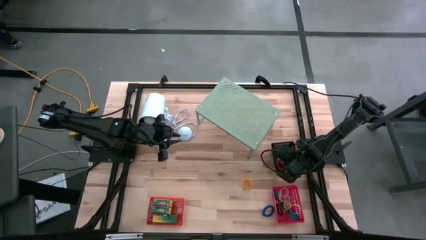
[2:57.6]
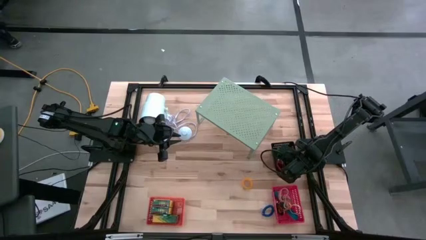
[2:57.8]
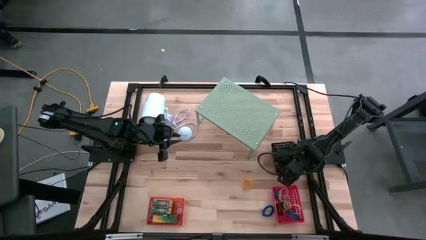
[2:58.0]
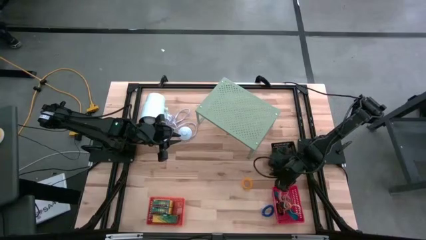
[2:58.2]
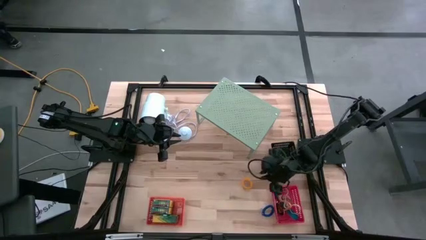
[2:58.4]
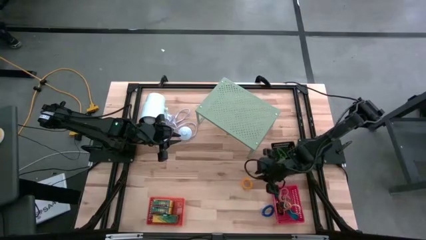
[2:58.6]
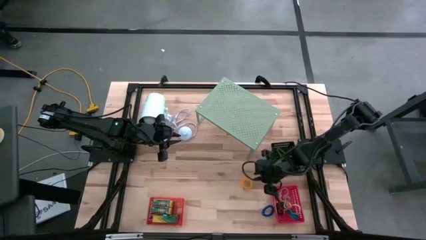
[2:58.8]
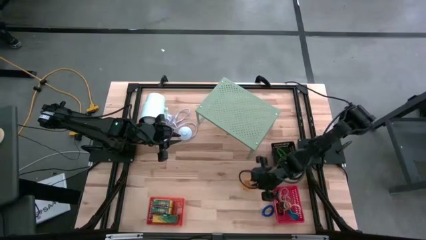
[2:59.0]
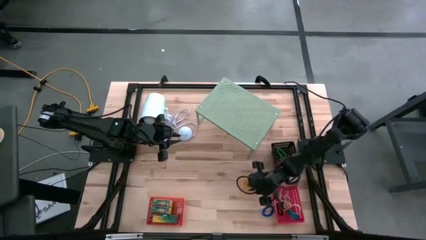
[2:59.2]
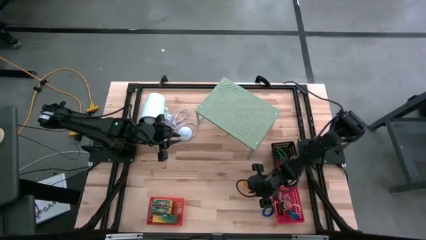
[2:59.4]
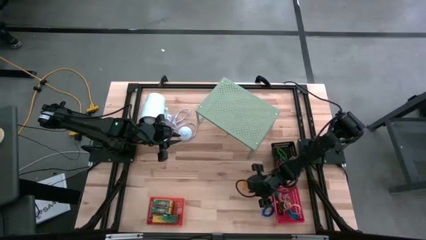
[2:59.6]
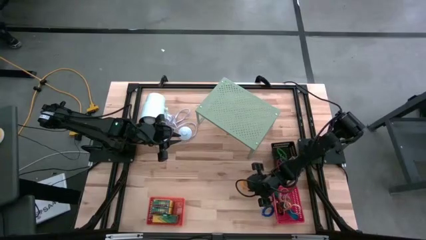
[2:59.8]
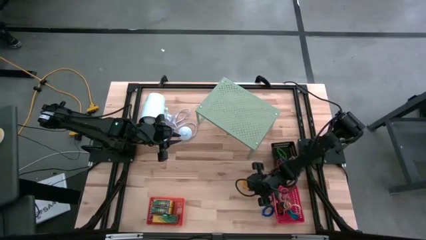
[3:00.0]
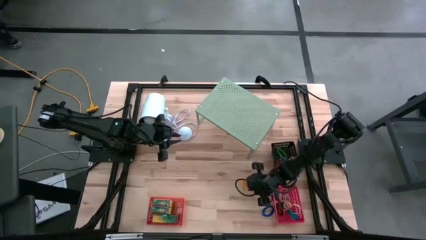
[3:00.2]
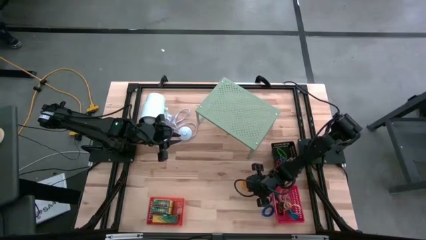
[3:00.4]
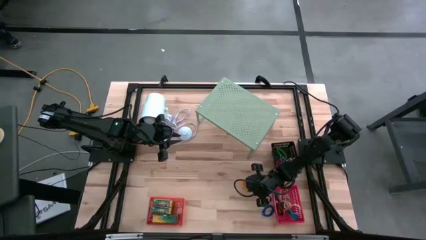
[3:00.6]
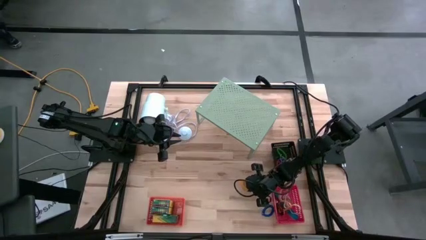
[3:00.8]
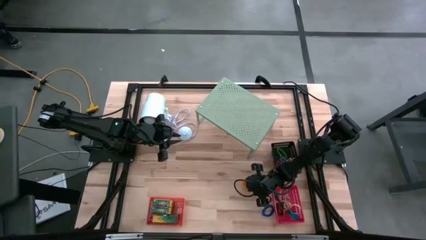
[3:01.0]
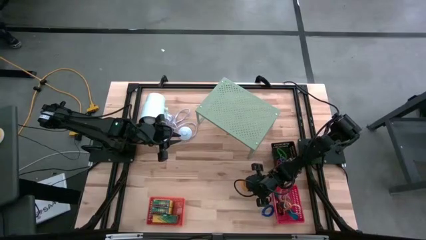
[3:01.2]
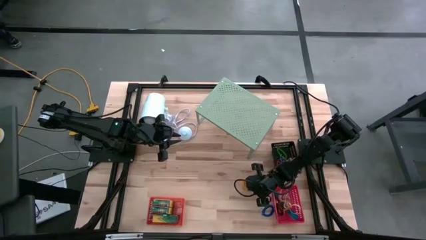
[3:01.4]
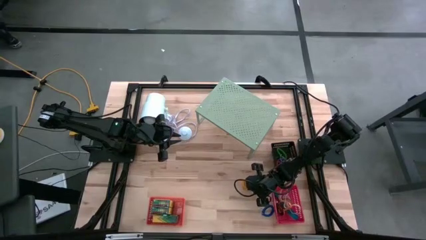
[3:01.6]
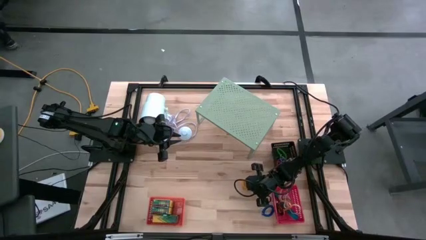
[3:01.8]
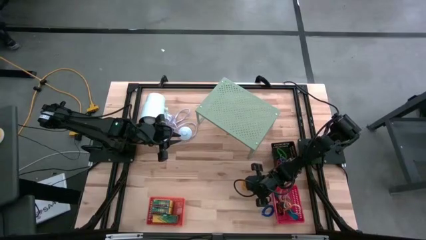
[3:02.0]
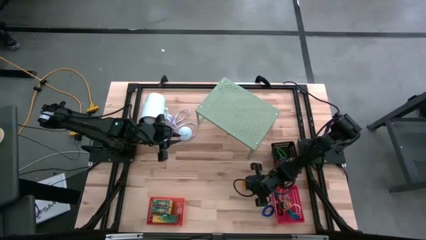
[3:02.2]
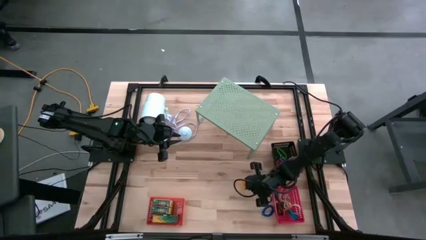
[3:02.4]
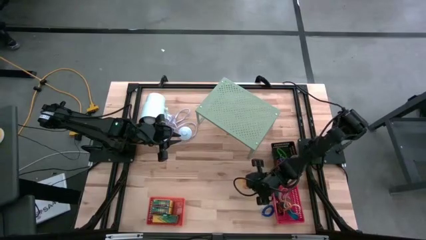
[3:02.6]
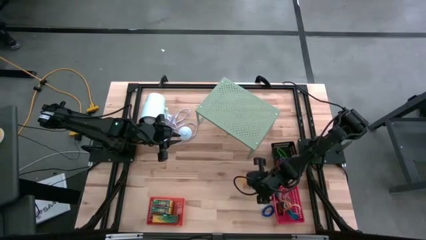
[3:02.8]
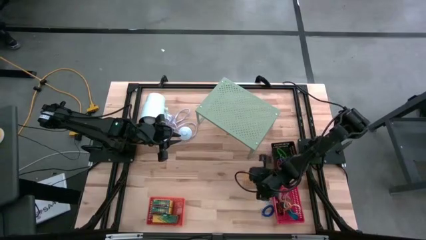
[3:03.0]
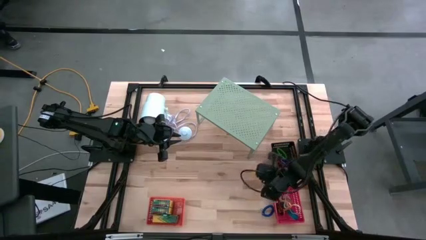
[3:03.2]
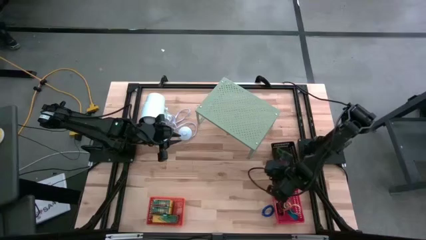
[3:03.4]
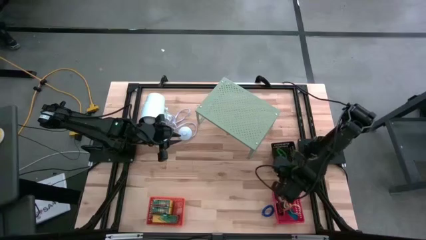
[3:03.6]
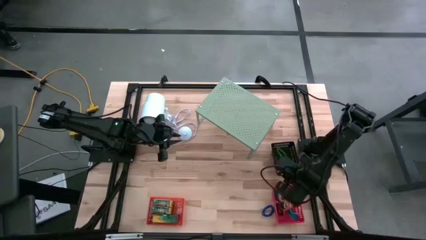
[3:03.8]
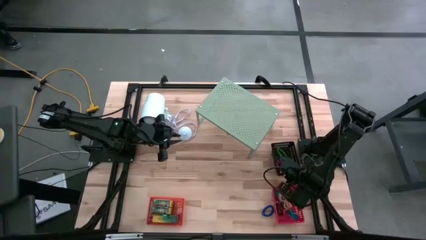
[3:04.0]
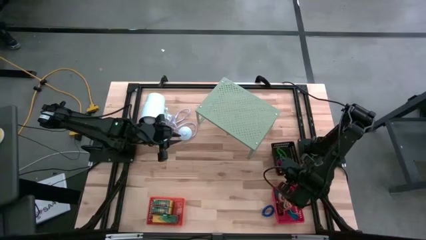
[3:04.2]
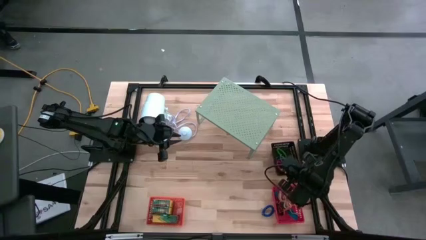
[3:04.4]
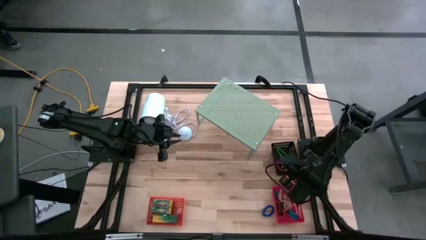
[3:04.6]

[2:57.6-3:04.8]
Task: Pick & Place Office Desk Supplies
Put the yellow spring keychain into the black bin

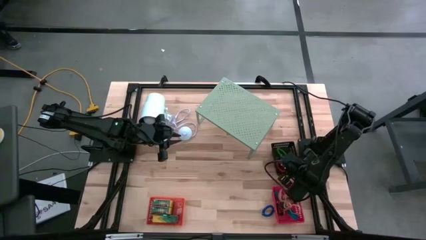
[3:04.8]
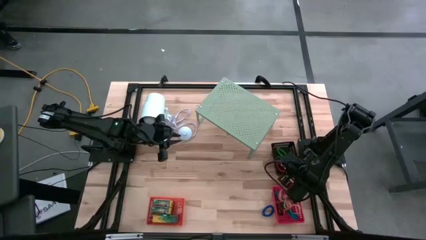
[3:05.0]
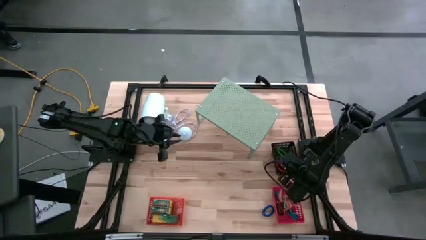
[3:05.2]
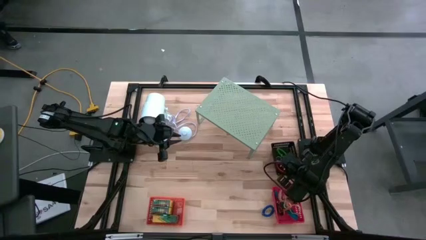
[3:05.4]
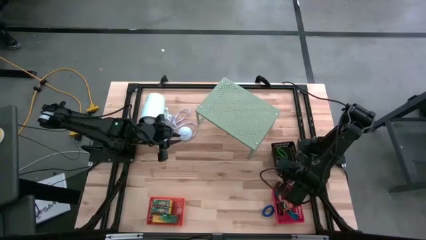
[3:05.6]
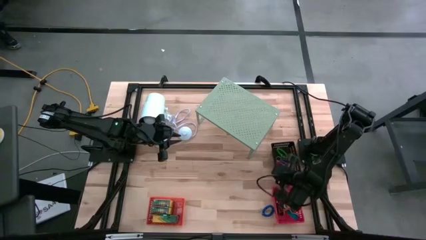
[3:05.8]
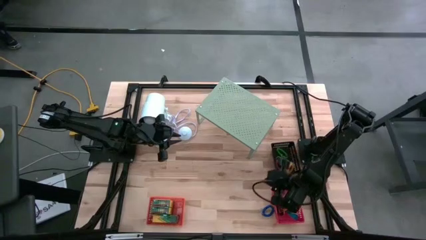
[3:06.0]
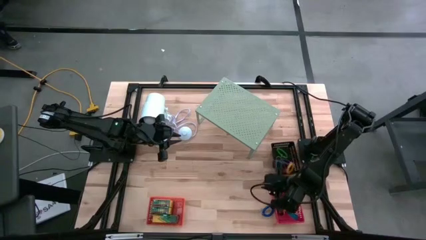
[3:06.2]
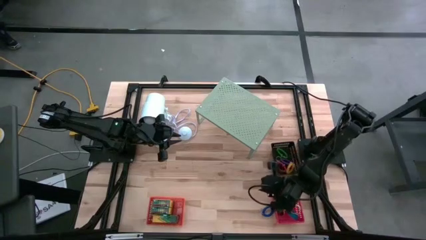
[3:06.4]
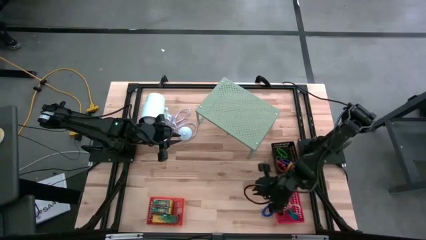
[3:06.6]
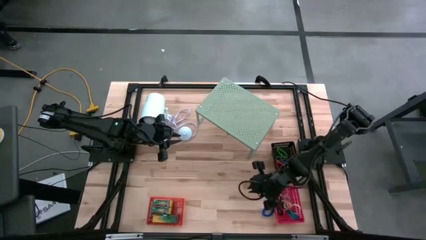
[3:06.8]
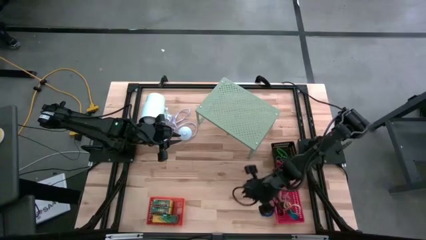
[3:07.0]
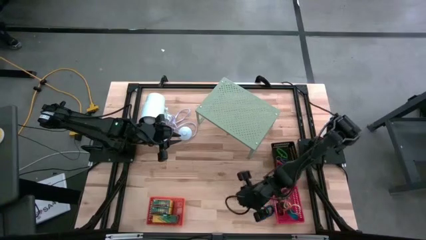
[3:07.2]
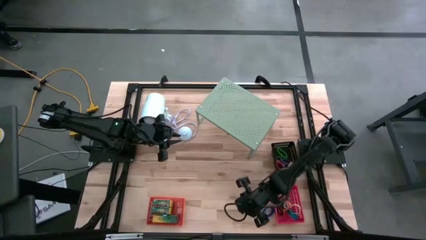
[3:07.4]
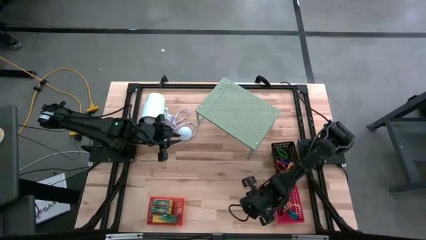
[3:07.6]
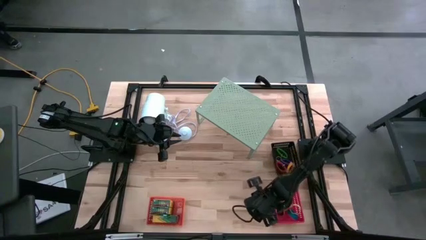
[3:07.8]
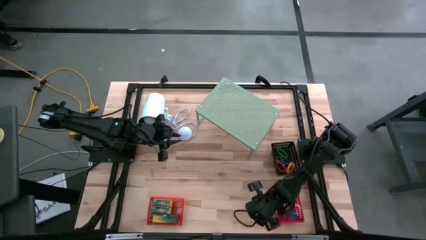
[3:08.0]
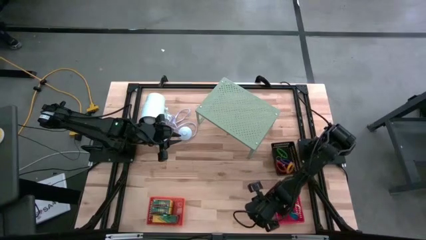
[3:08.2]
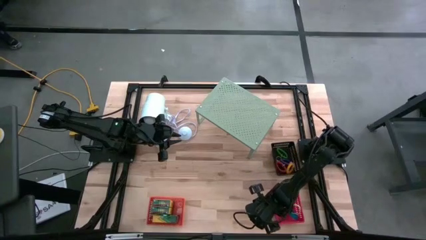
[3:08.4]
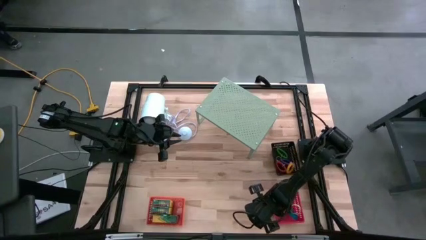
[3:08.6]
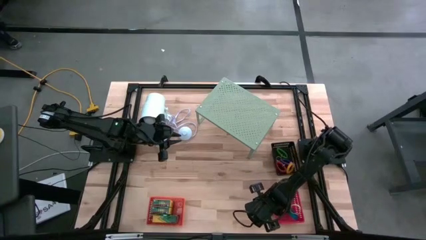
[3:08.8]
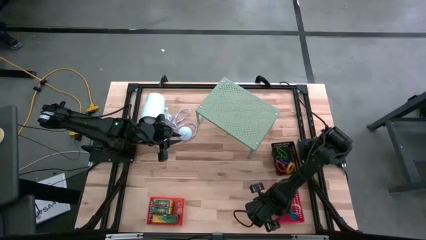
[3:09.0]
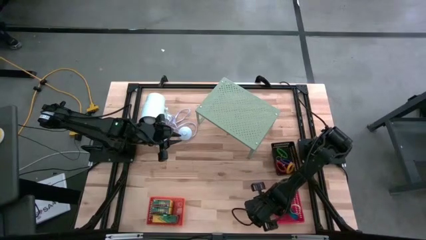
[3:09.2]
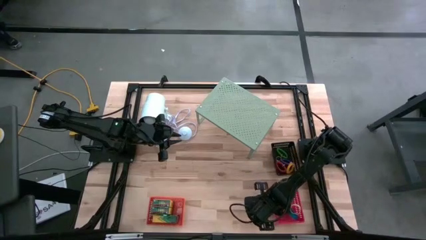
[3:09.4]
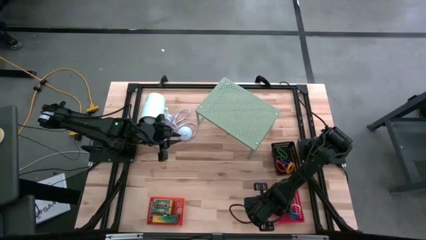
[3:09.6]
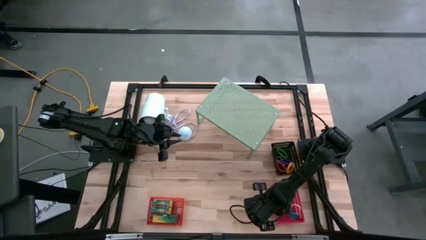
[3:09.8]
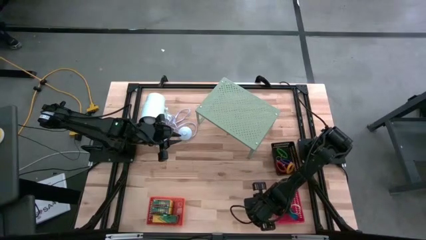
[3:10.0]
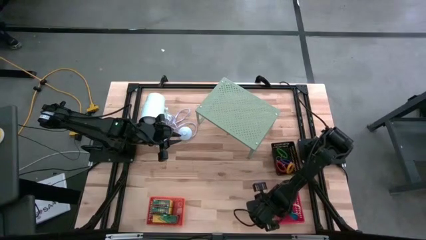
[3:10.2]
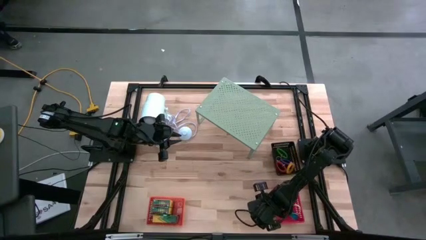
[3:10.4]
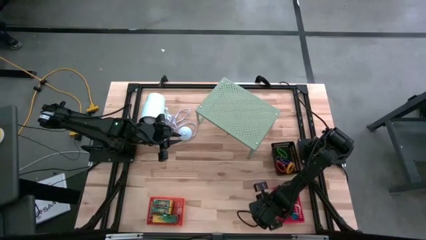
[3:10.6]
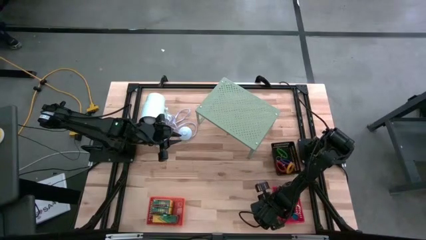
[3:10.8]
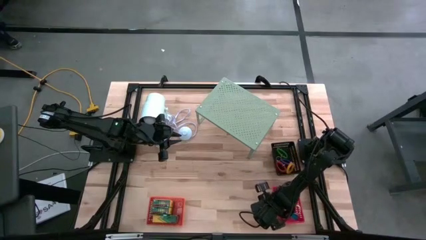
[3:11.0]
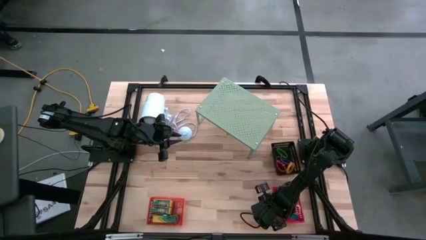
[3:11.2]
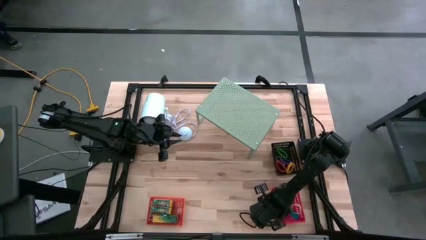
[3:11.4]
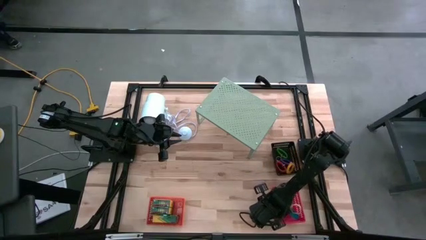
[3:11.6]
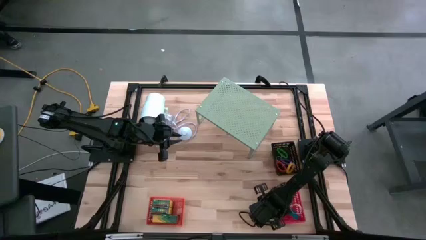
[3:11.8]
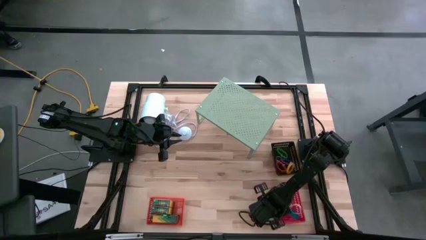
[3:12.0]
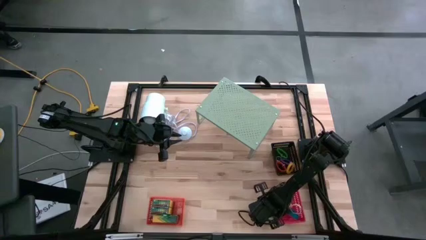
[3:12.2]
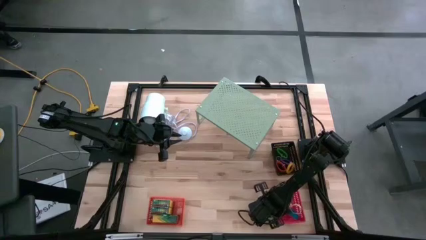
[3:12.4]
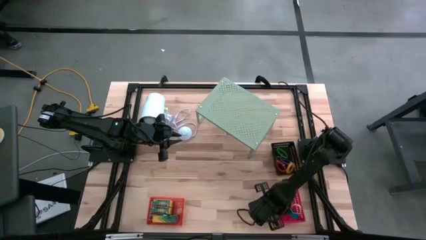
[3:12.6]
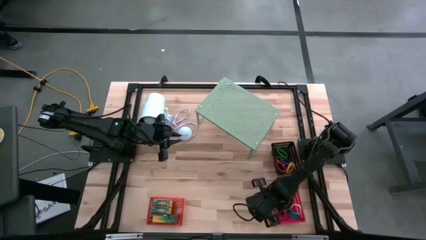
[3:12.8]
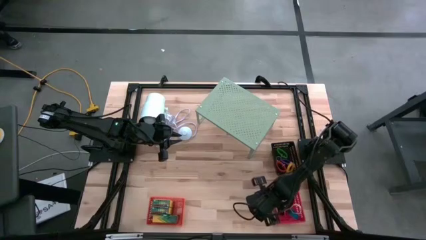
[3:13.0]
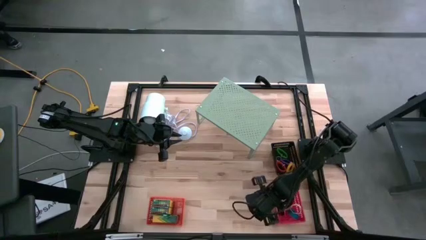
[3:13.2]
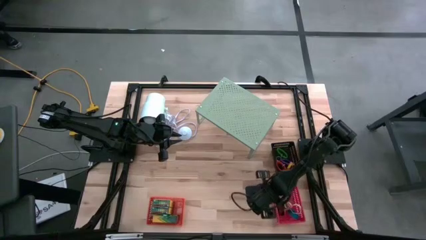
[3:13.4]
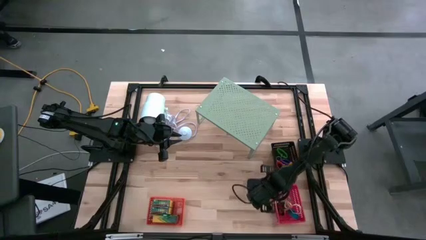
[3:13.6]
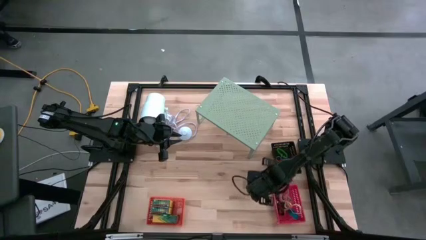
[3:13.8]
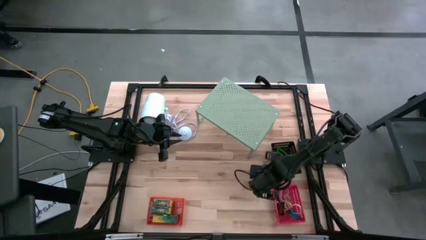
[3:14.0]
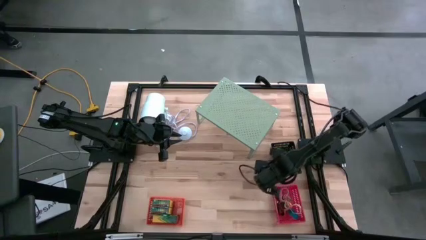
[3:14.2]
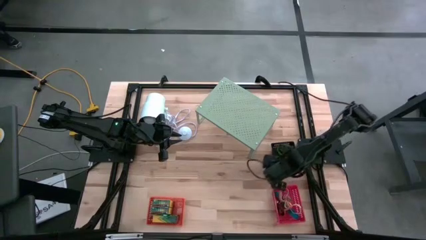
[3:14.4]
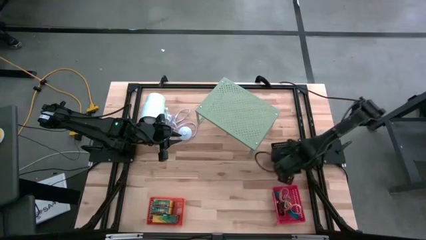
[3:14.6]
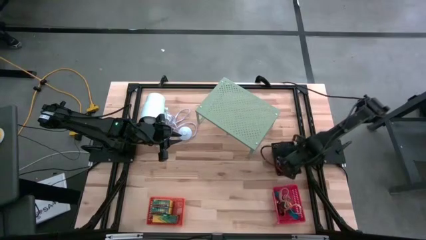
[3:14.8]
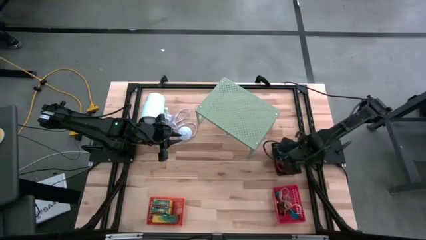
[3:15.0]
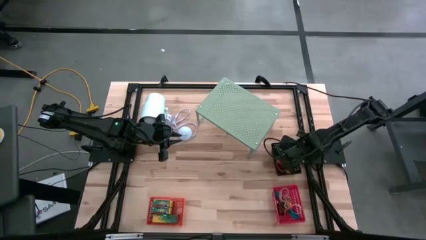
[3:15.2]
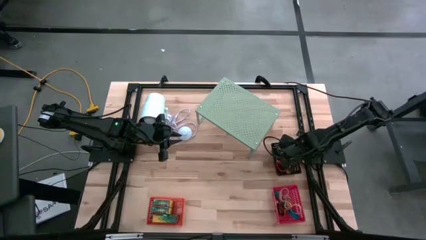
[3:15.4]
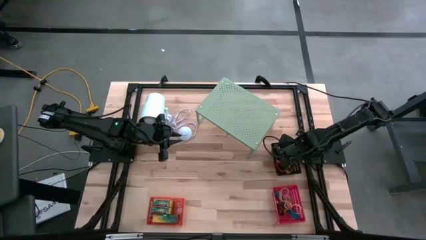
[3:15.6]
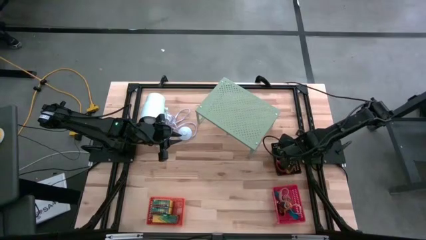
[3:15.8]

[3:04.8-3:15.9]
Put the blue spring keychain into the black bin
